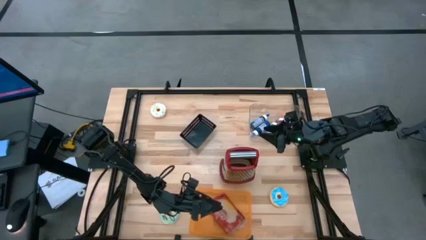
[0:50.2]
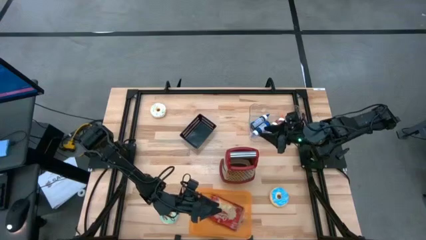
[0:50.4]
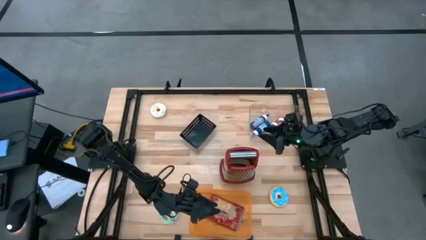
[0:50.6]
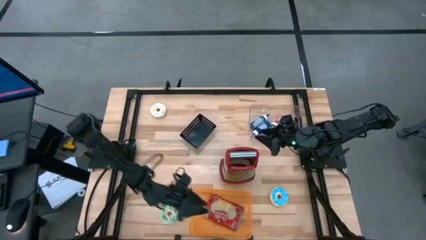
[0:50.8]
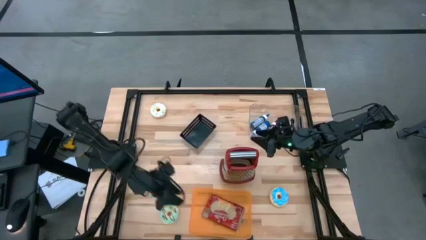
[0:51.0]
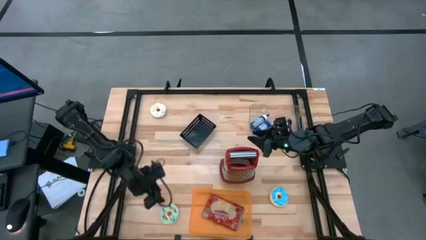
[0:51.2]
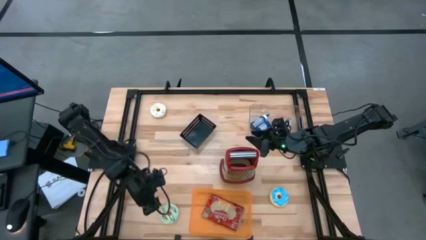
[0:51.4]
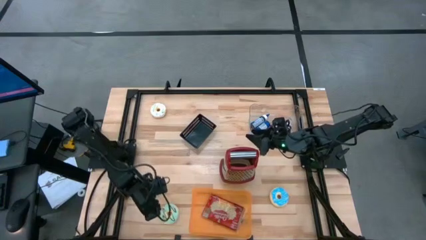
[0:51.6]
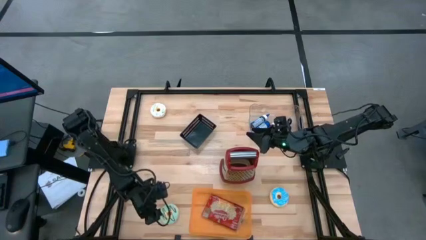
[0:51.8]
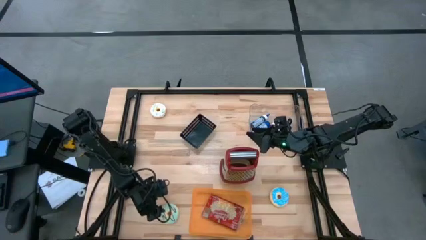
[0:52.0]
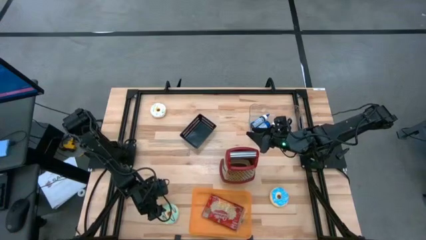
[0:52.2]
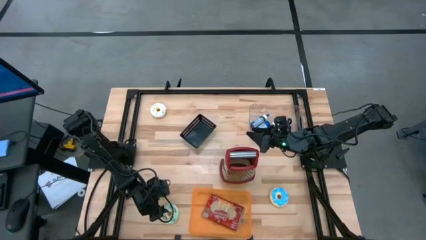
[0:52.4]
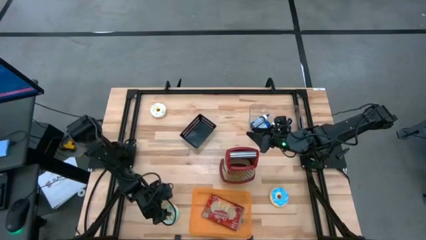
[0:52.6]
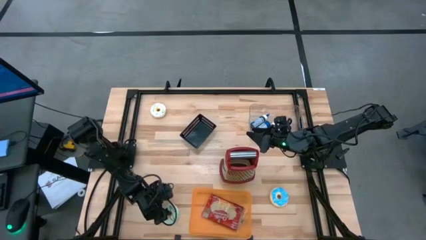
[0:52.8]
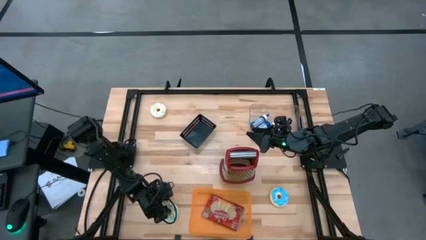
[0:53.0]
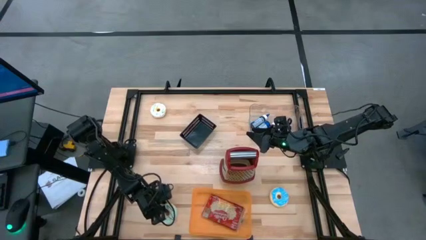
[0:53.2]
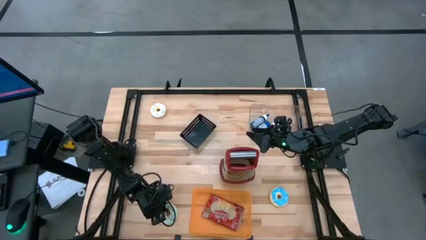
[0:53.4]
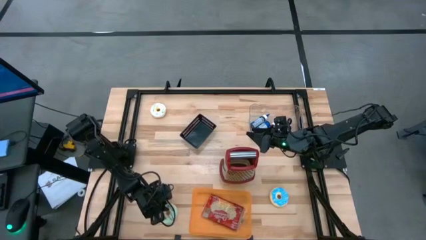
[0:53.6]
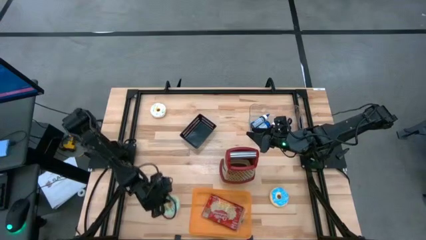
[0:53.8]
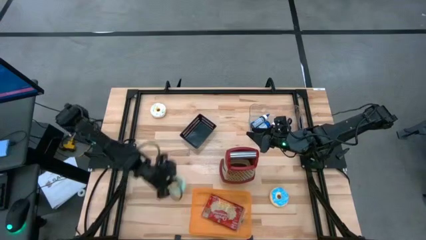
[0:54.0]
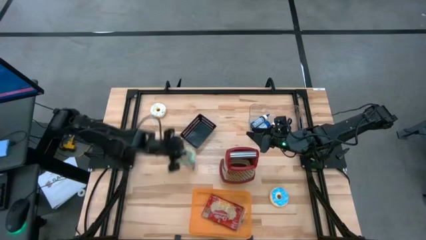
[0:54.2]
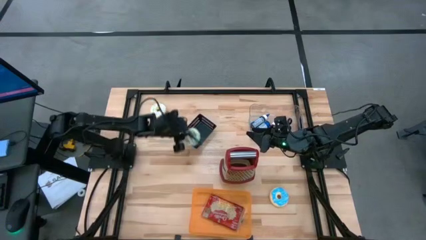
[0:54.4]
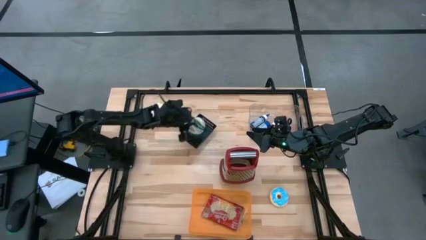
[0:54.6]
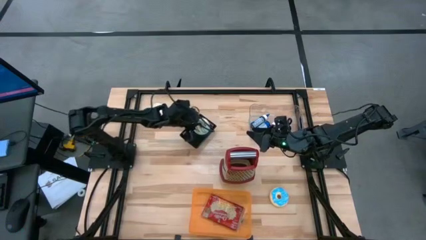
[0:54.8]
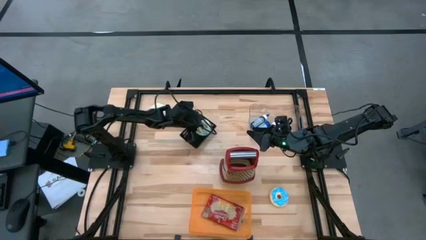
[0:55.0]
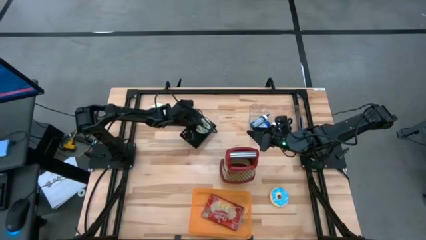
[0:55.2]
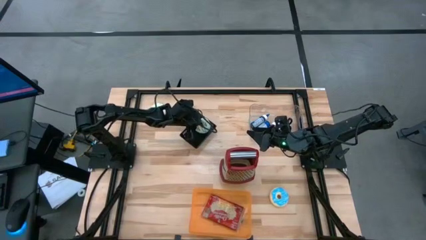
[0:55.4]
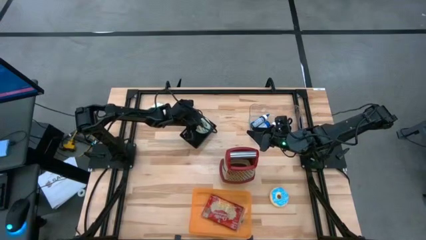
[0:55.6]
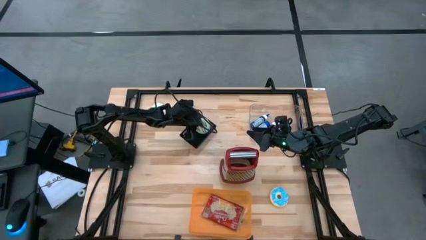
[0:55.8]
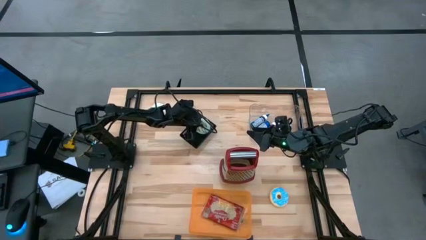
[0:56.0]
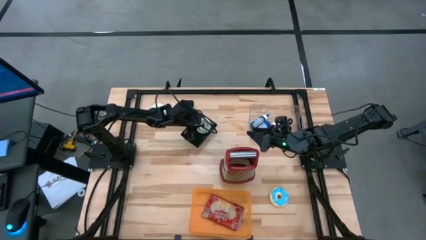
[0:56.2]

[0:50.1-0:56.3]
Put the light blue donut into the black bin

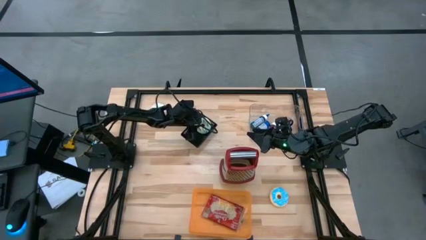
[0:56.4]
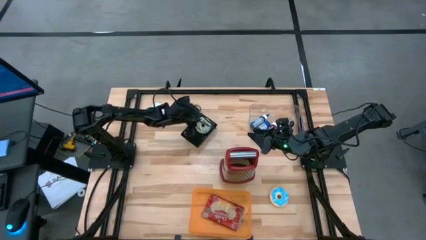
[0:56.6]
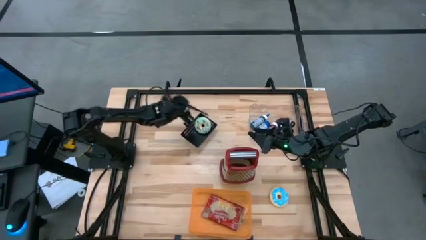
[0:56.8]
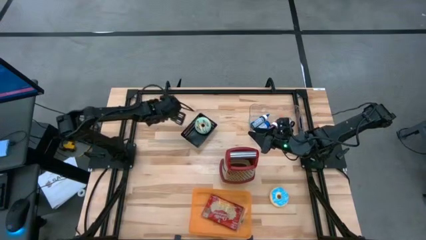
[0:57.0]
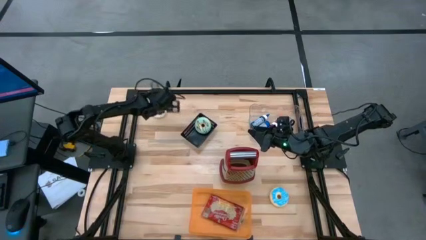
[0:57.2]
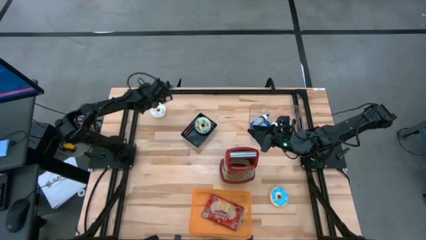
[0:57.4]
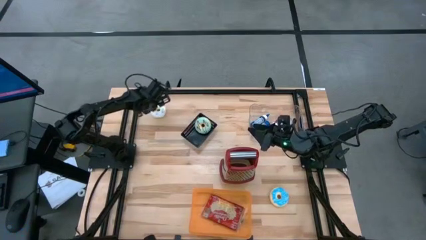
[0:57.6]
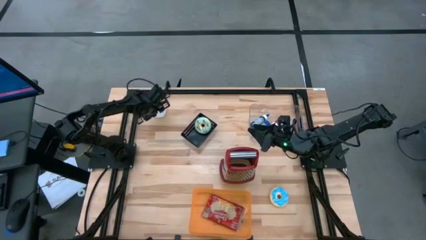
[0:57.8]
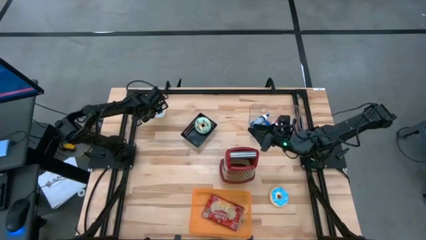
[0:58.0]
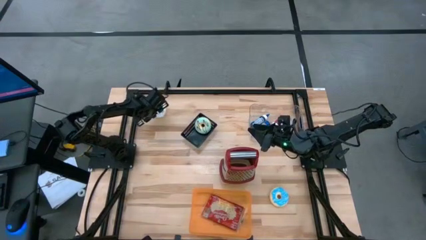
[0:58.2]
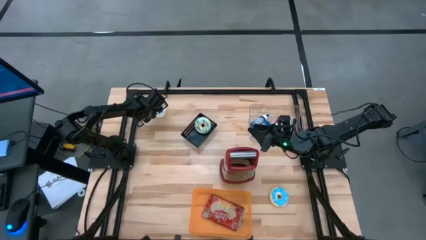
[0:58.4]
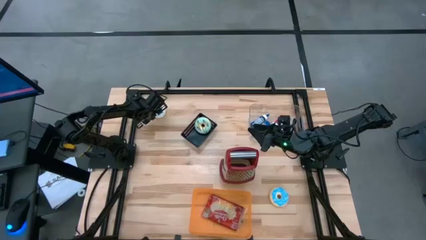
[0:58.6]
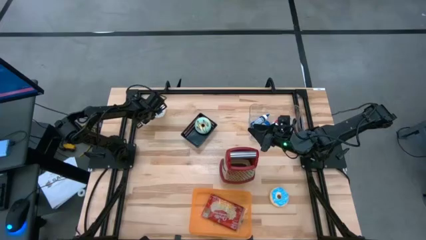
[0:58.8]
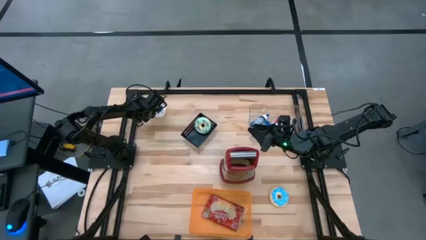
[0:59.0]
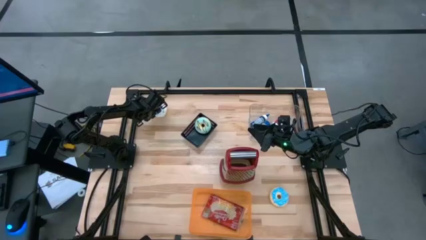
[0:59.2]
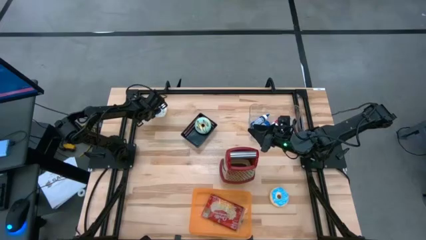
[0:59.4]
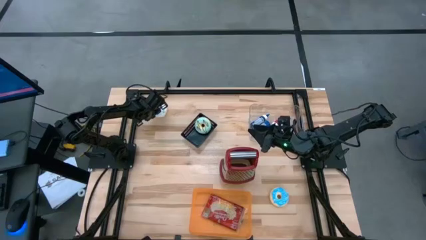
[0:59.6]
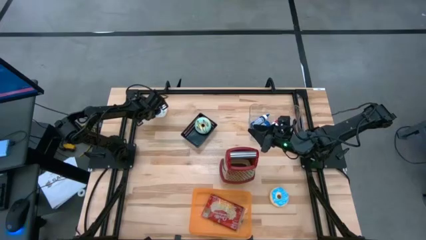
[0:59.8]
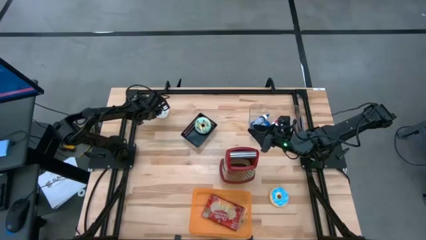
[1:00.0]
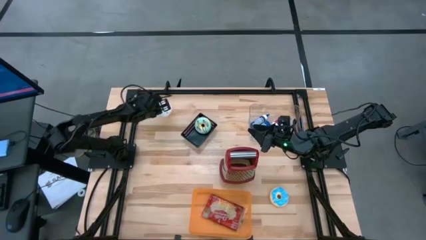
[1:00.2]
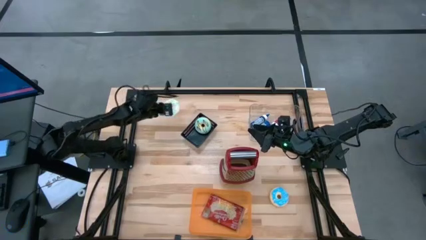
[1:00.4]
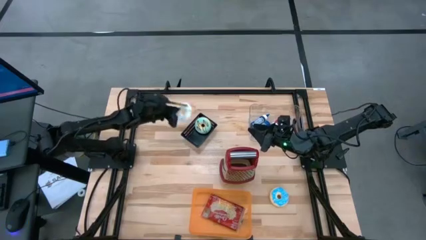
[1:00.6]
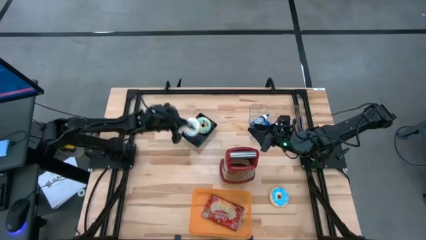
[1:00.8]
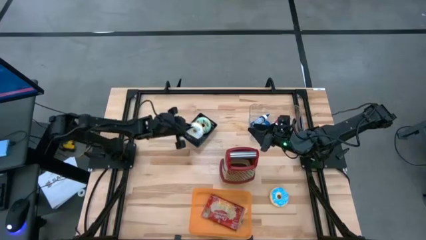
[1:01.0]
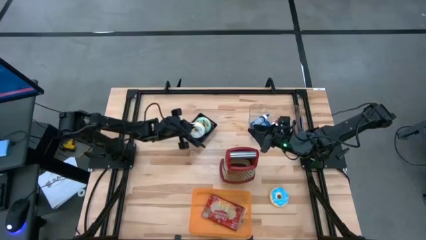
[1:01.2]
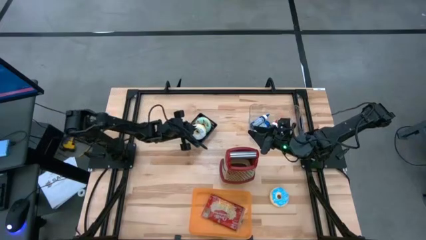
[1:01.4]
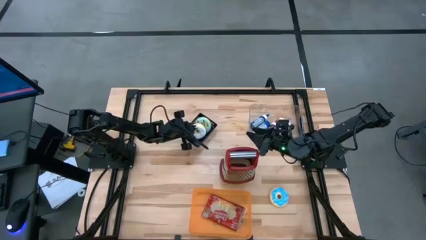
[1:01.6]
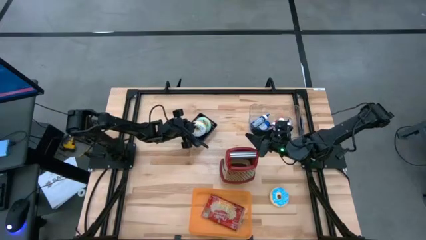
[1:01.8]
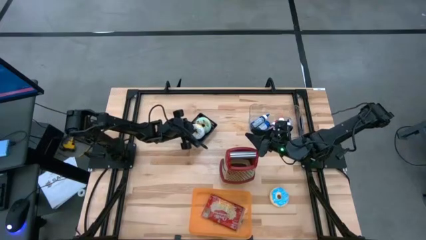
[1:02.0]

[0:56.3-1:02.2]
Put the white donut into the black bin

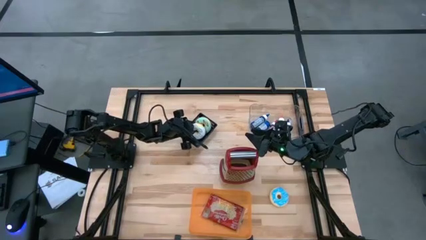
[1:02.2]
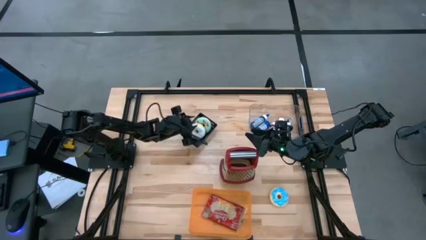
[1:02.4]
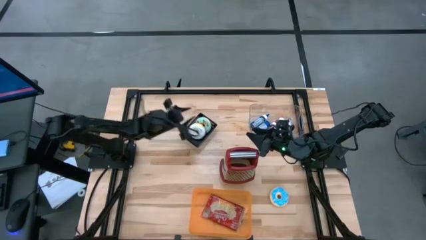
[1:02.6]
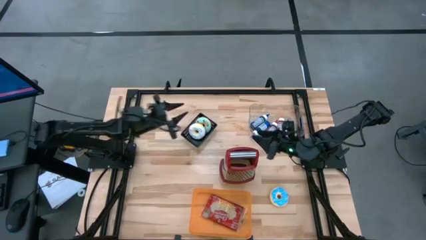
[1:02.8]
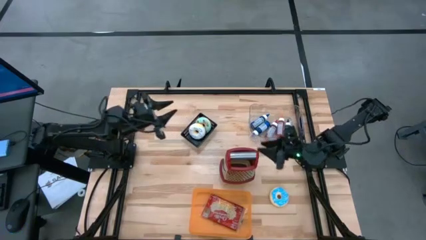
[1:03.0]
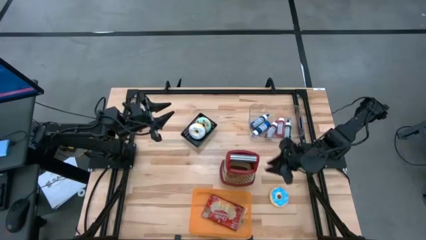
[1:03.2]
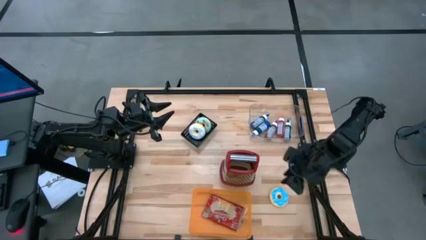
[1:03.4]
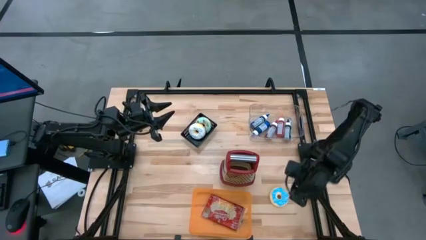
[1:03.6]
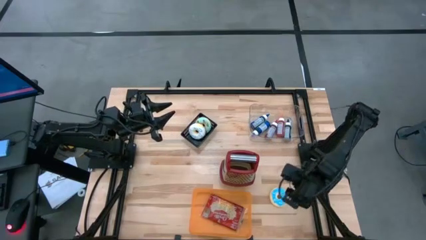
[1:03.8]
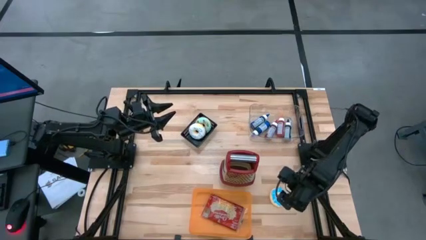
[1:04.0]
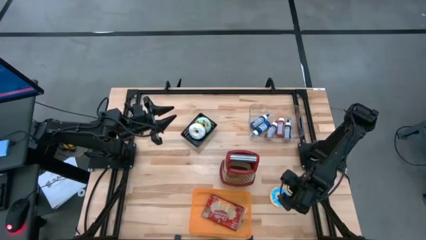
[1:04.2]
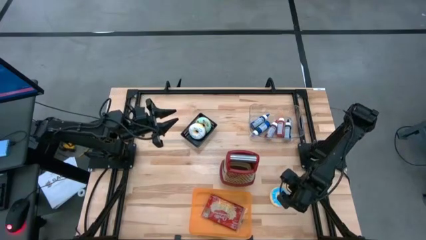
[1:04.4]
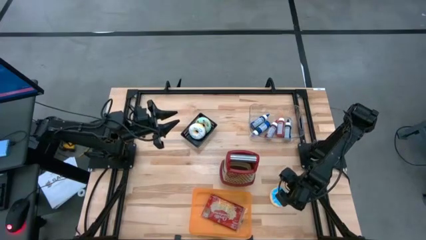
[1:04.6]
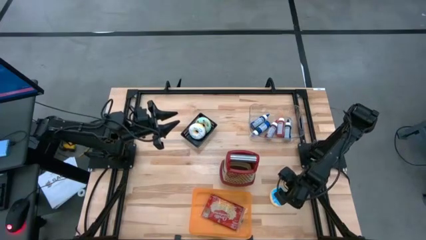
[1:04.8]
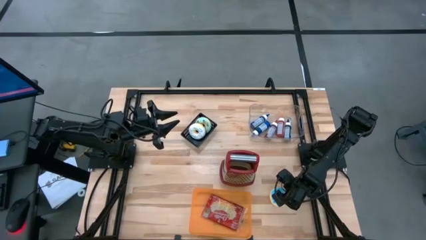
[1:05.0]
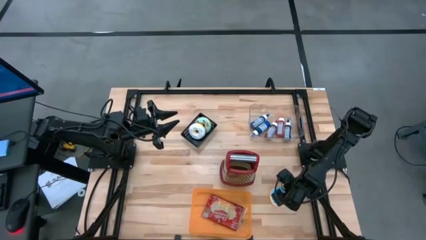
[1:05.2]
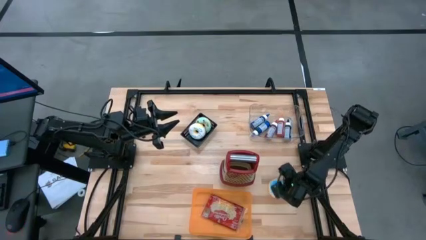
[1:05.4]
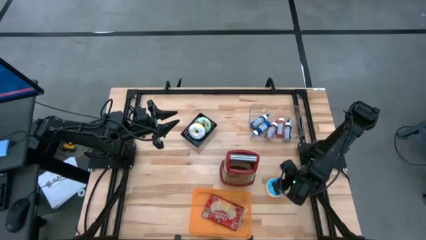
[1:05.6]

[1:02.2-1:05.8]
Put the blue donut into the black bin
